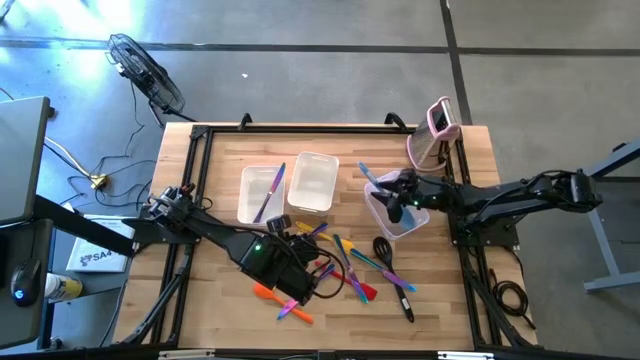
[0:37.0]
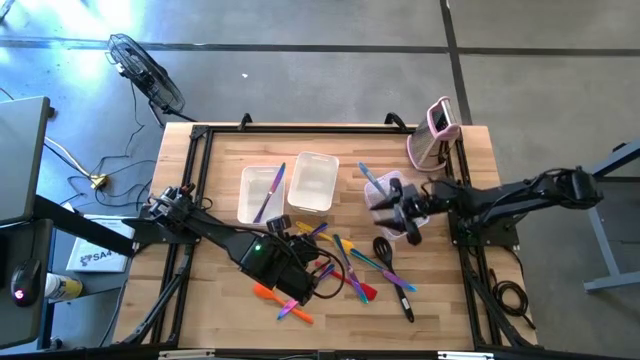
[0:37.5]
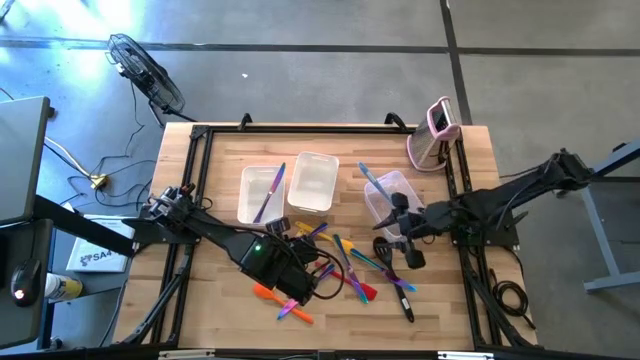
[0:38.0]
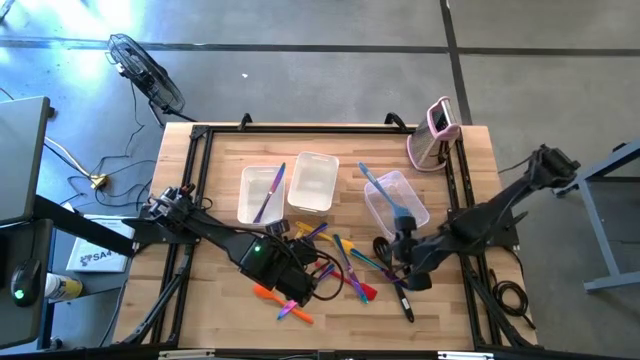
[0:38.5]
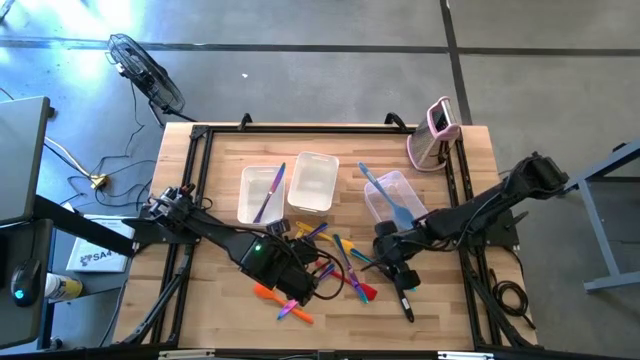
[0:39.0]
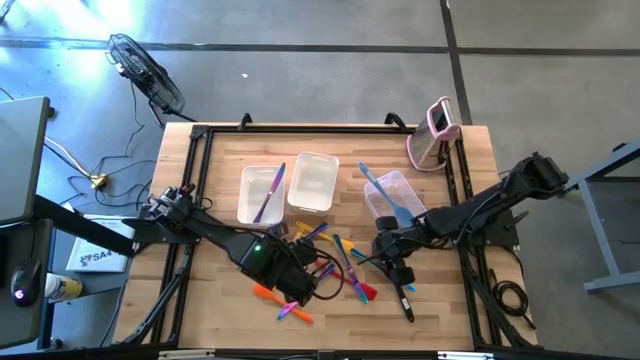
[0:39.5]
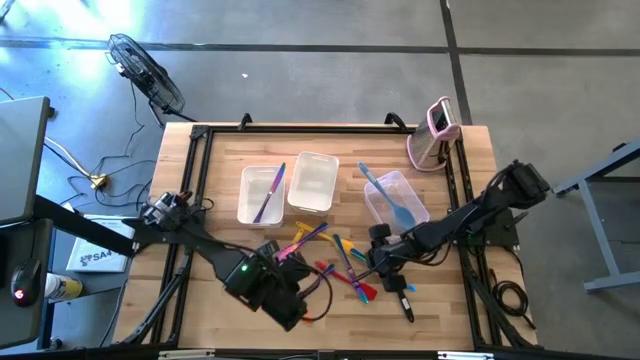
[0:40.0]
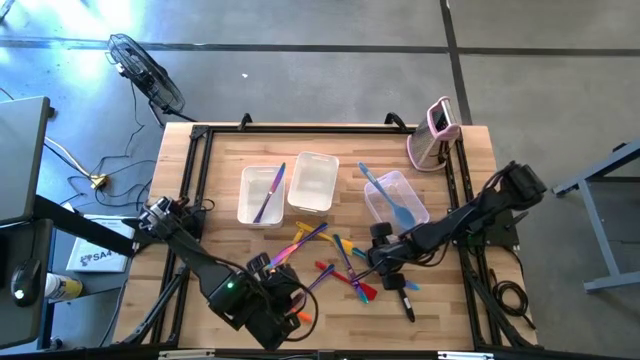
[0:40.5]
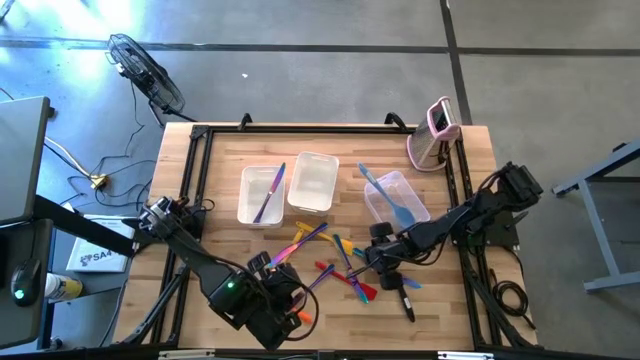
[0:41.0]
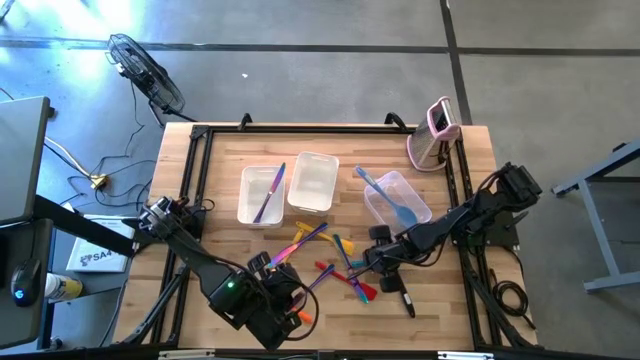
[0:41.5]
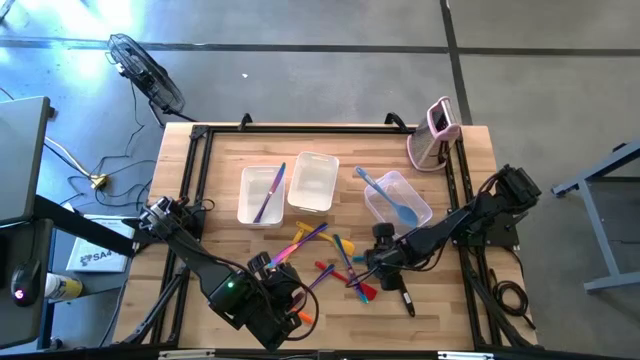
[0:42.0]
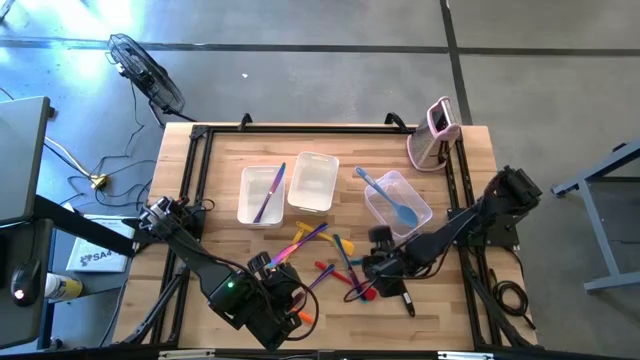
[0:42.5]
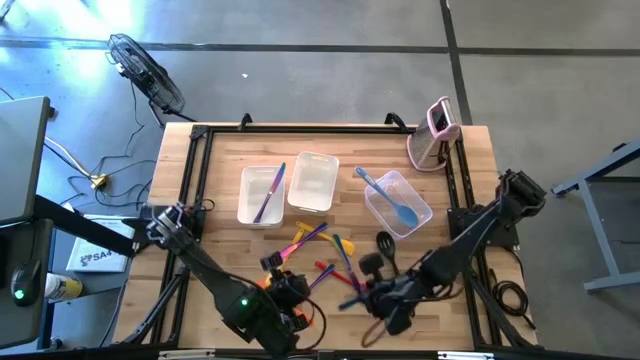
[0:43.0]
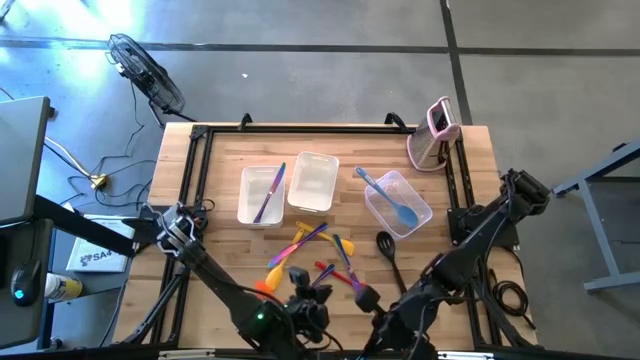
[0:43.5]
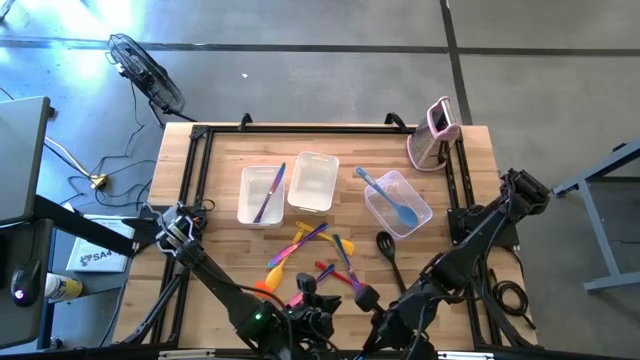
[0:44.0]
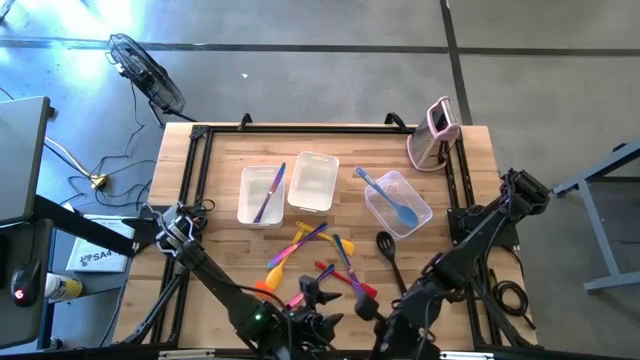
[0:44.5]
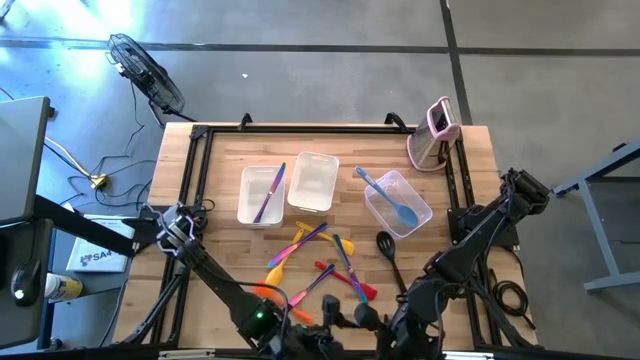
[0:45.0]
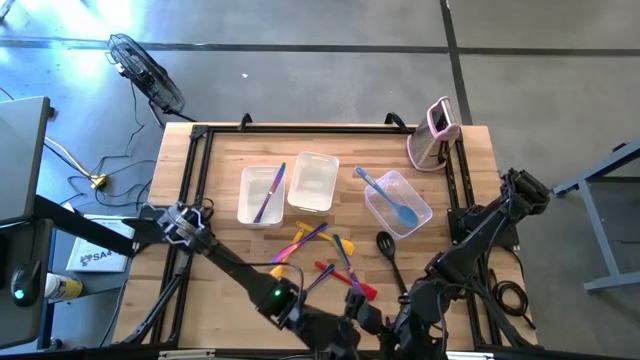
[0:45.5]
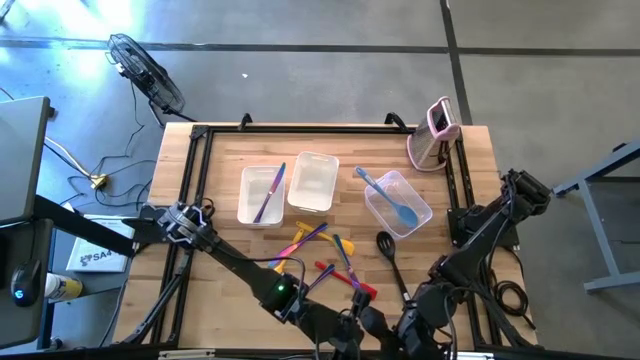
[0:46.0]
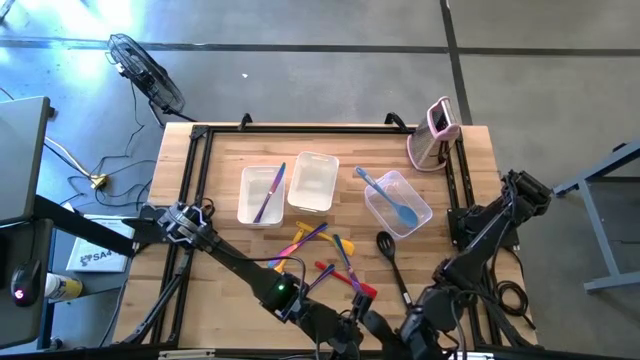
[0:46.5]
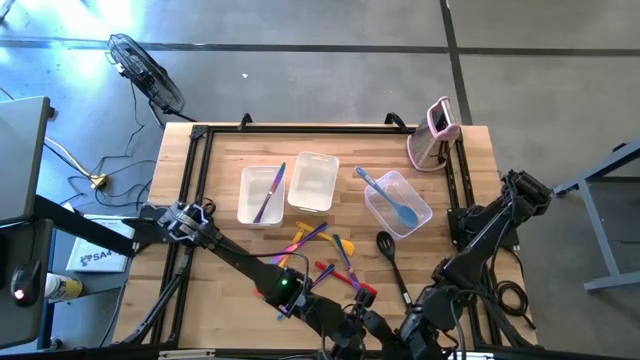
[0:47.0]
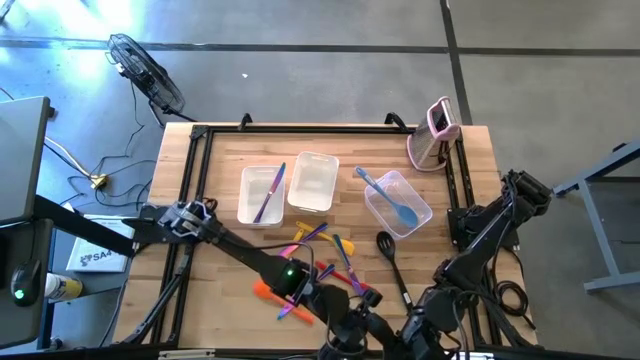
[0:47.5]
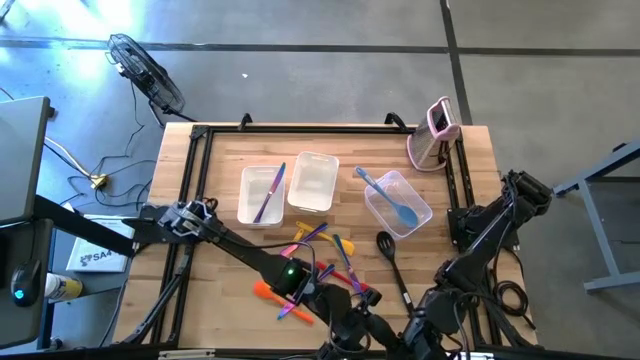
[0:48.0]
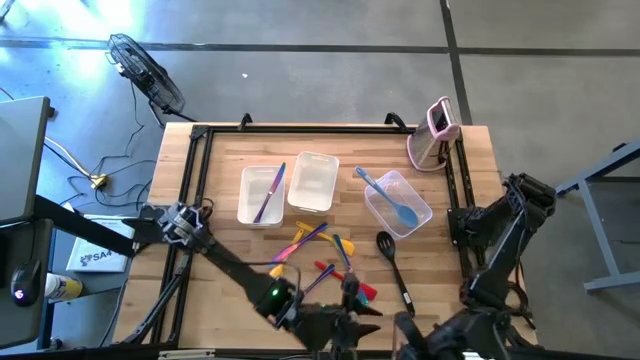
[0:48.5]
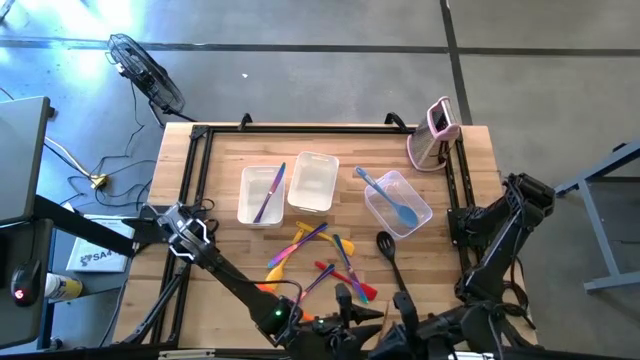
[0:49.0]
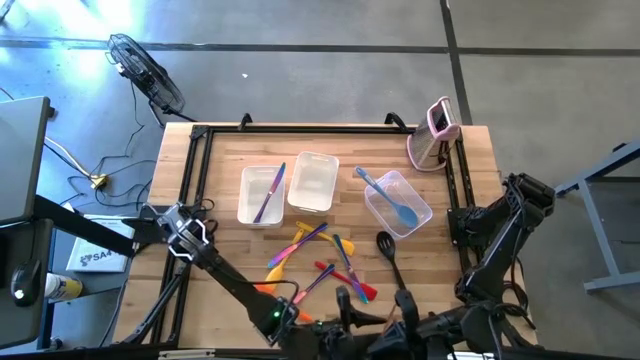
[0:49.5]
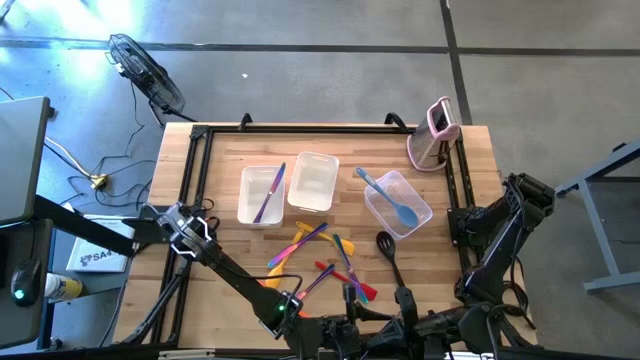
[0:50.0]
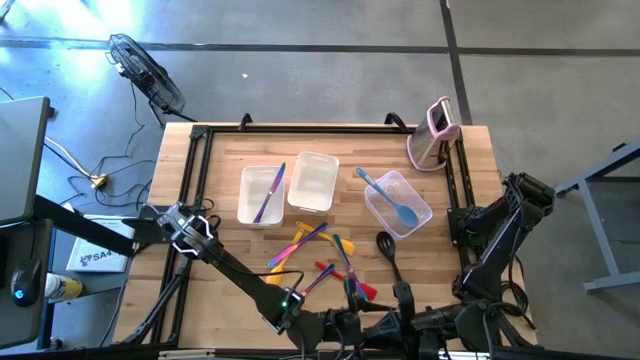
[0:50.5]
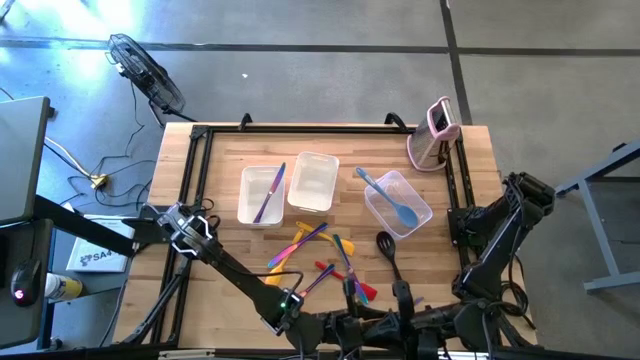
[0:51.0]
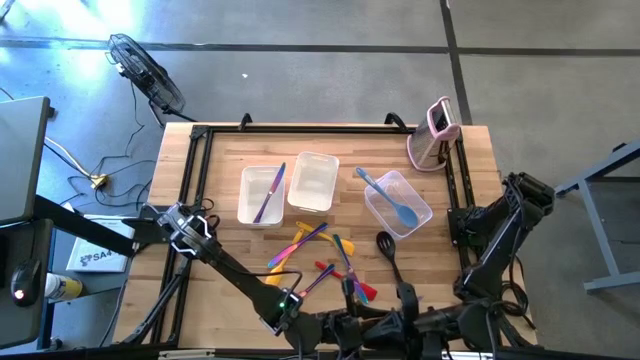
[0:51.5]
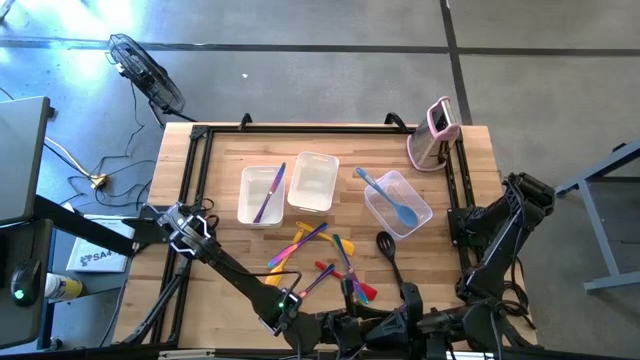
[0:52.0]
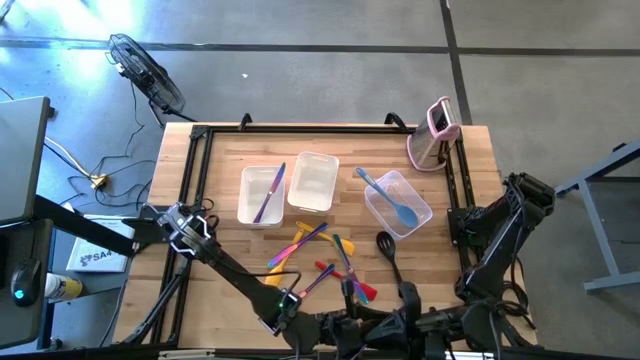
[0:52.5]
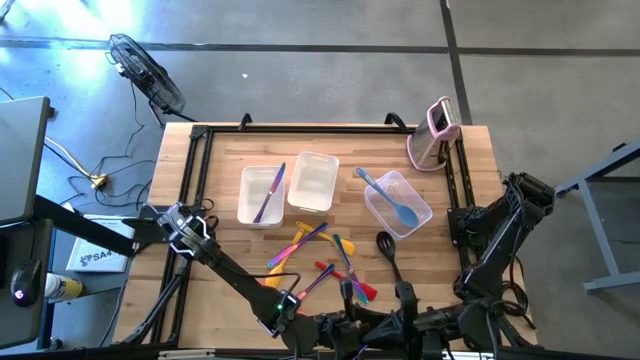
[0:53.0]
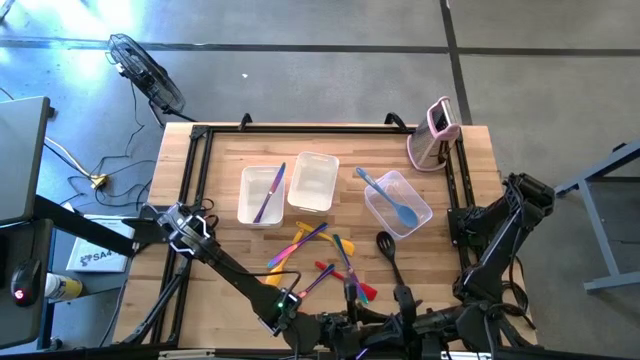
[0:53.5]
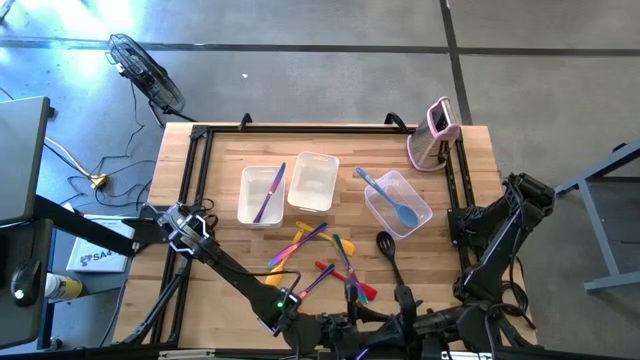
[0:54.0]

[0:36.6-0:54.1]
Task: Pick & Place Kitchen Items
Put the blue table knife into the left white bin

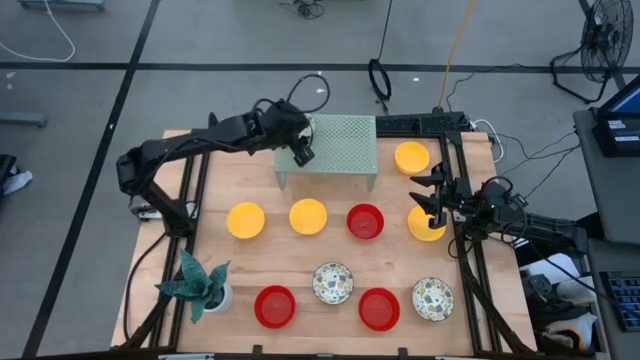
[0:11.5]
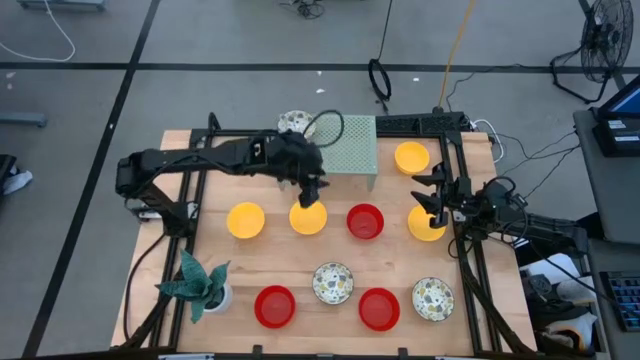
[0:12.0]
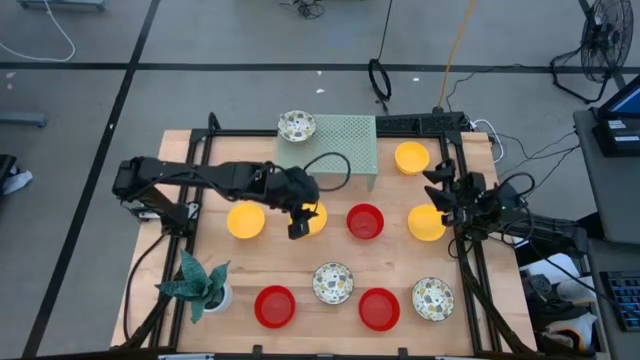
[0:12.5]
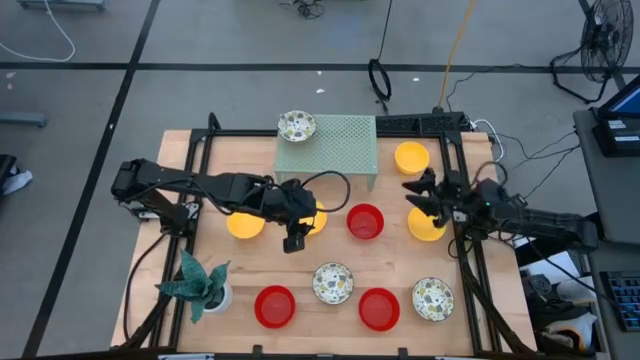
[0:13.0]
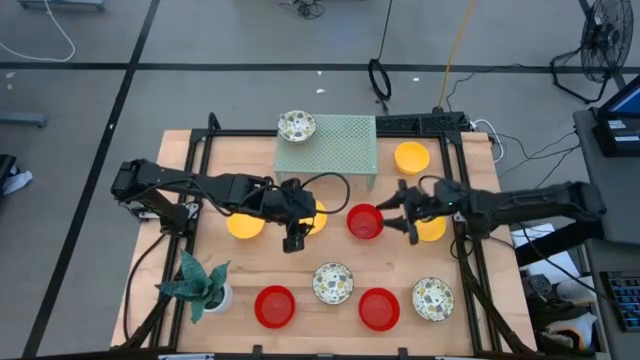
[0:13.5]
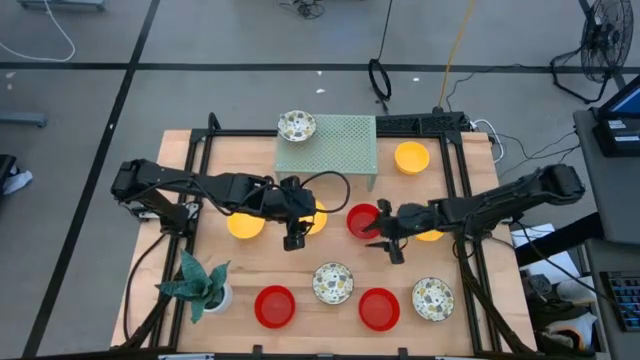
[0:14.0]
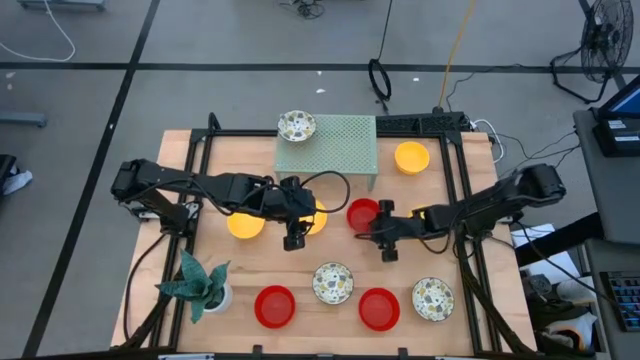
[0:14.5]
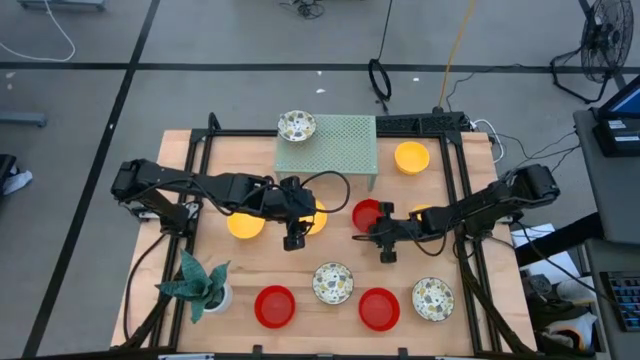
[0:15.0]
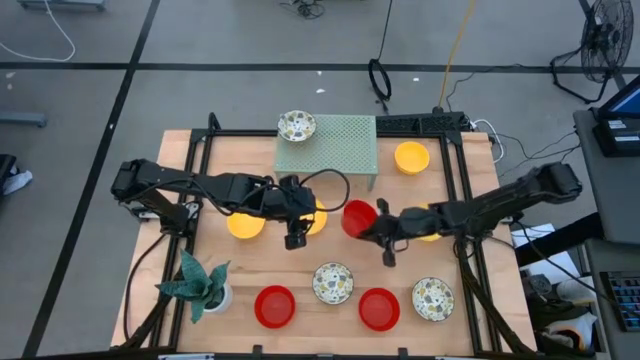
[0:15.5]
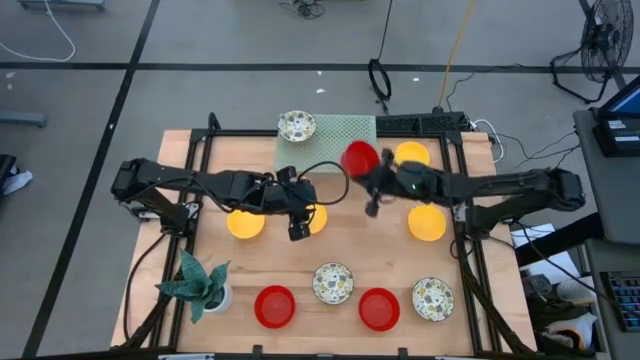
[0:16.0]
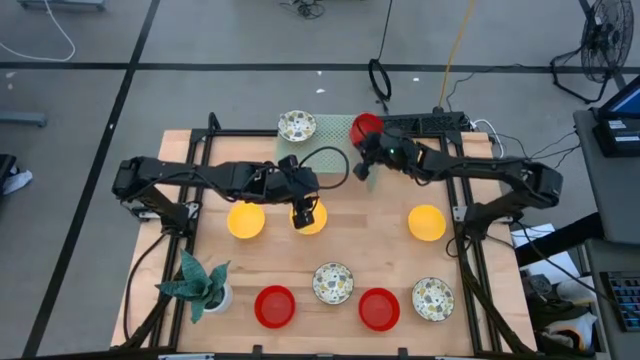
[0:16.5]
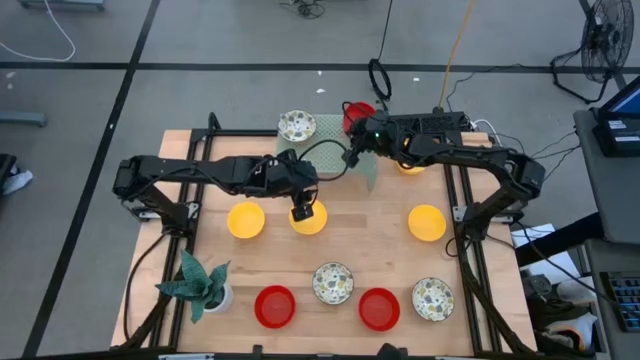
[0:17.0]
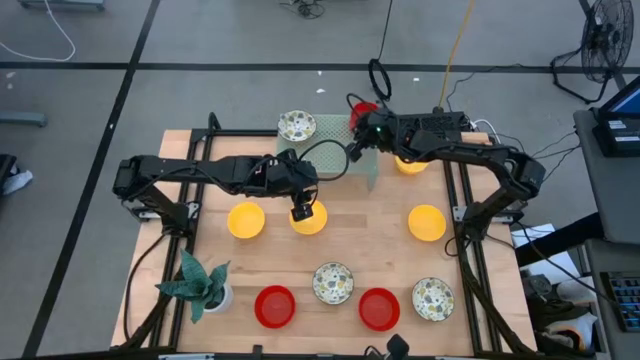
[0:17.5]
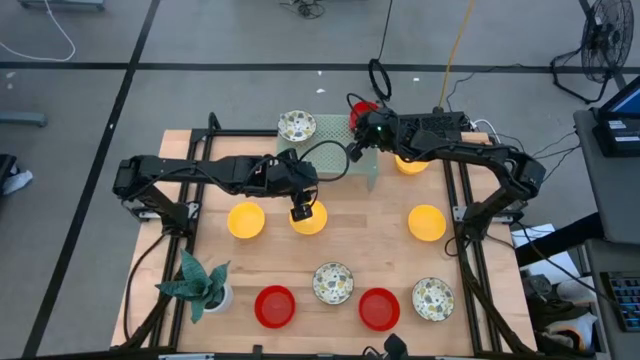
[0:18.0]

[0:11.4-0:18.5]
Task: Pick & Place Mini bowls
Put the red bowl on the shelf
